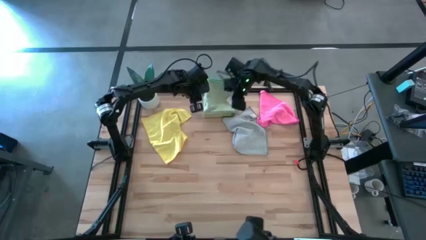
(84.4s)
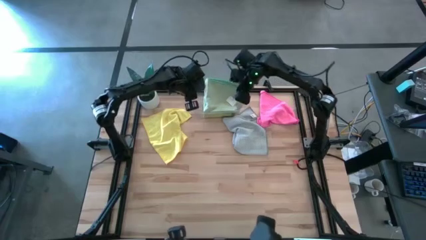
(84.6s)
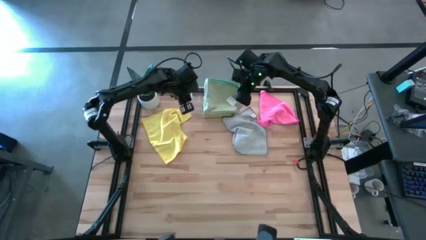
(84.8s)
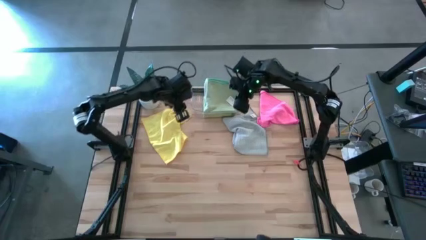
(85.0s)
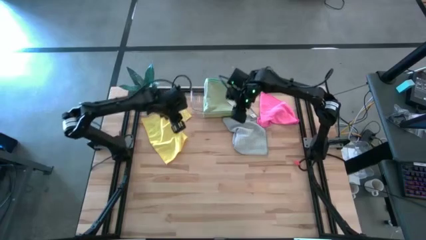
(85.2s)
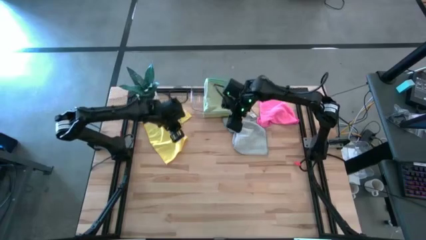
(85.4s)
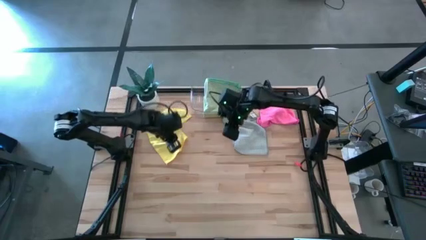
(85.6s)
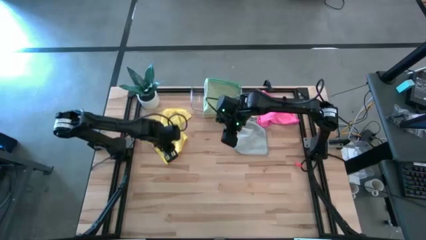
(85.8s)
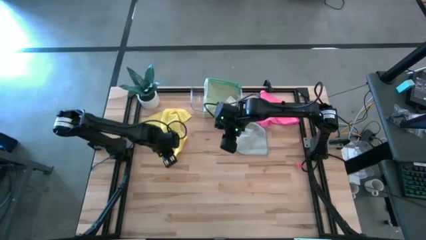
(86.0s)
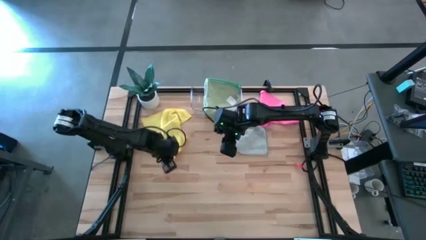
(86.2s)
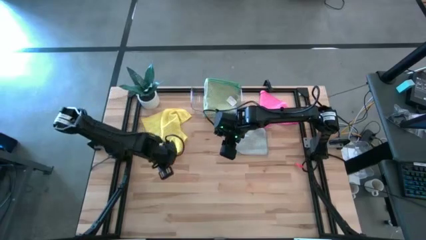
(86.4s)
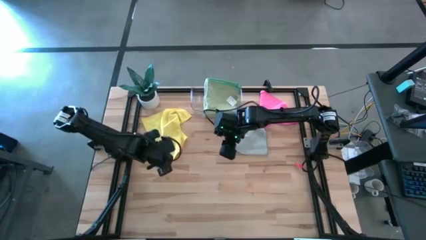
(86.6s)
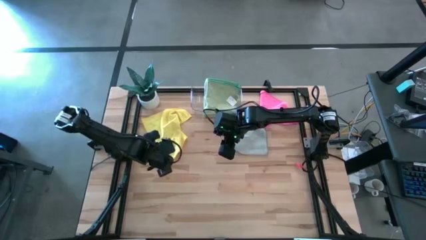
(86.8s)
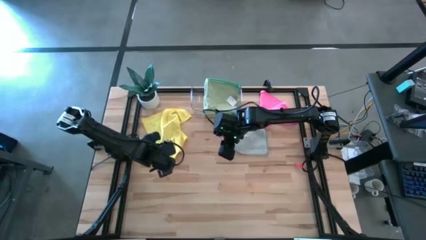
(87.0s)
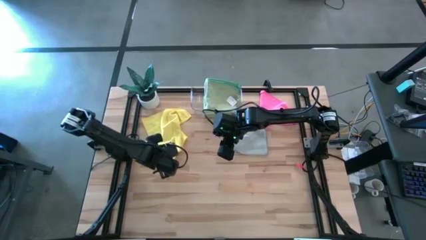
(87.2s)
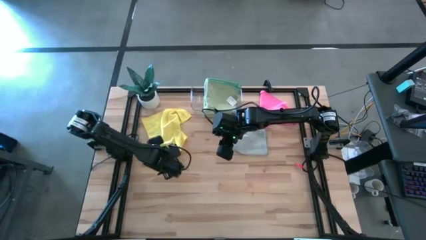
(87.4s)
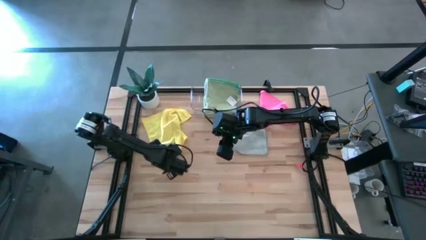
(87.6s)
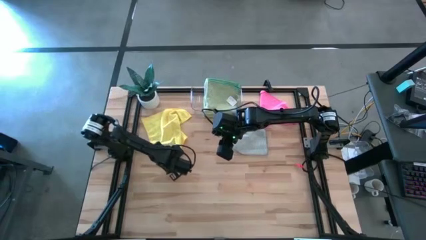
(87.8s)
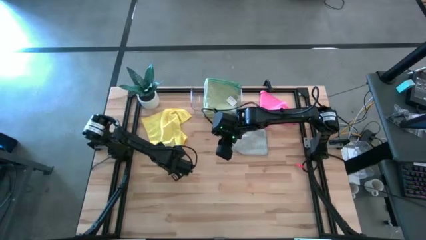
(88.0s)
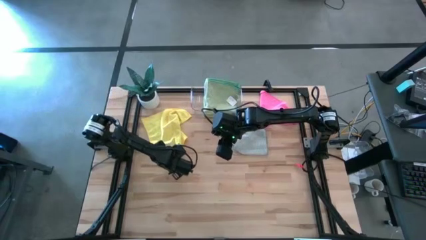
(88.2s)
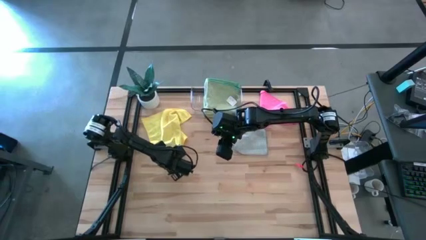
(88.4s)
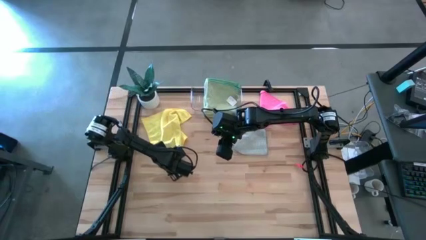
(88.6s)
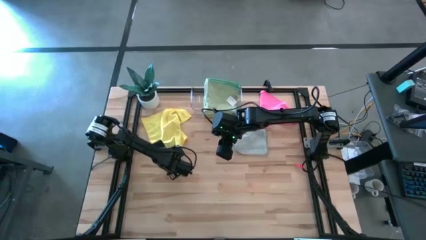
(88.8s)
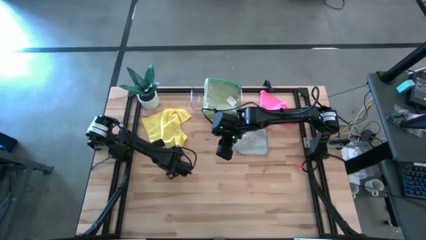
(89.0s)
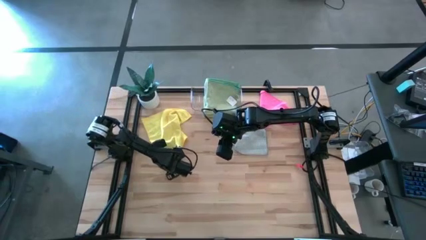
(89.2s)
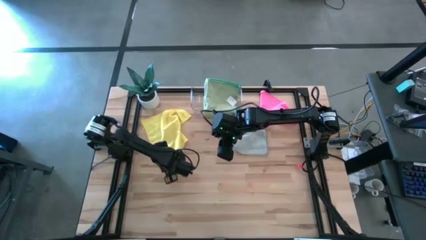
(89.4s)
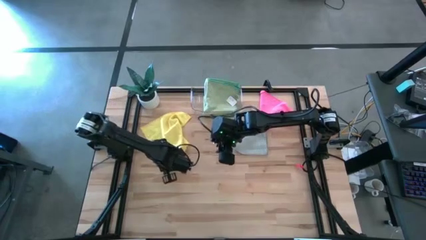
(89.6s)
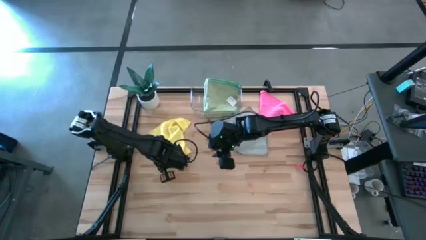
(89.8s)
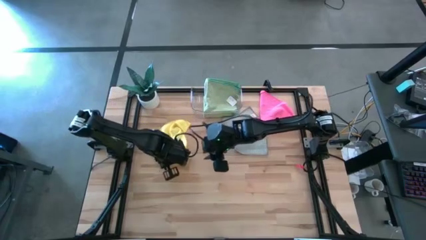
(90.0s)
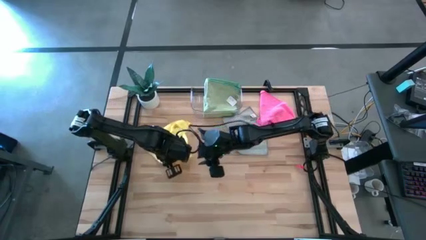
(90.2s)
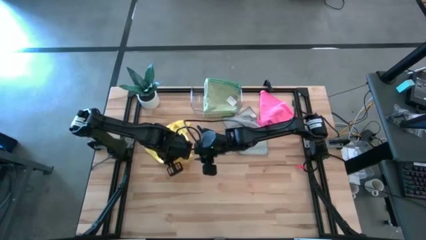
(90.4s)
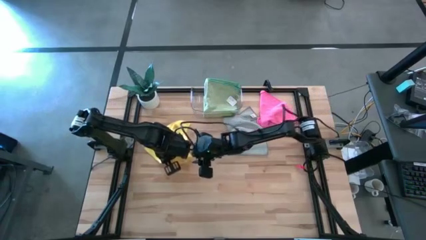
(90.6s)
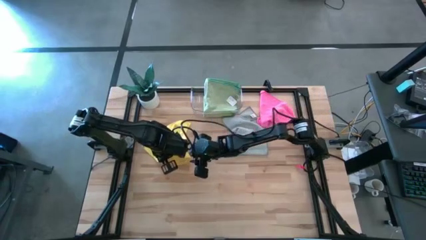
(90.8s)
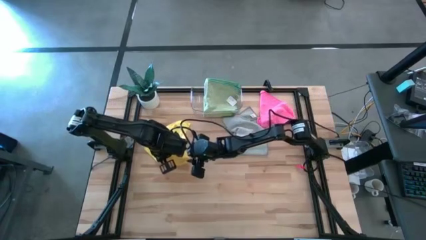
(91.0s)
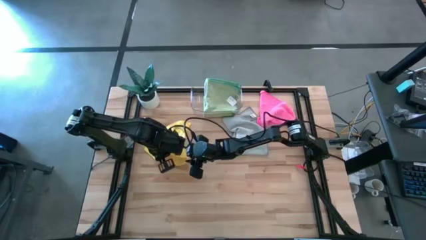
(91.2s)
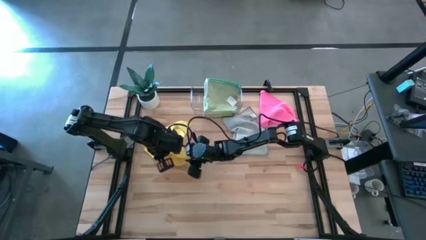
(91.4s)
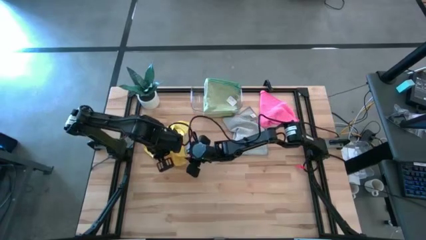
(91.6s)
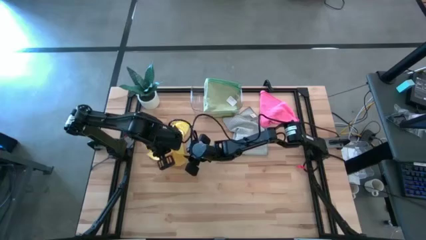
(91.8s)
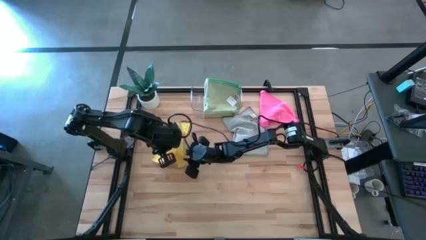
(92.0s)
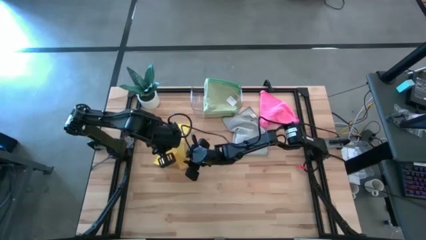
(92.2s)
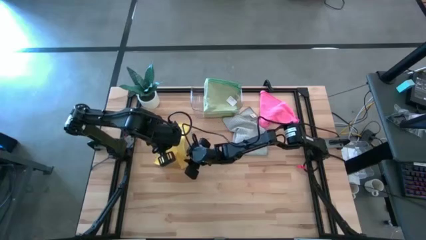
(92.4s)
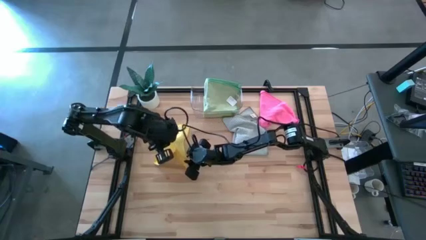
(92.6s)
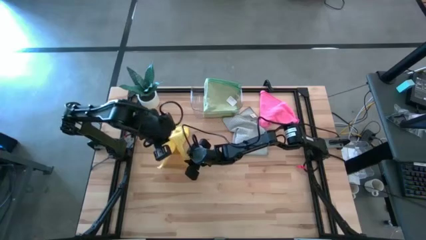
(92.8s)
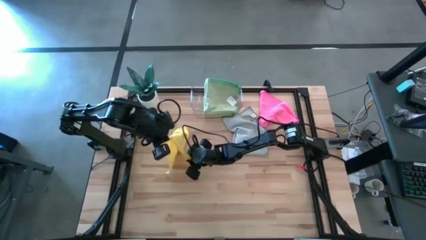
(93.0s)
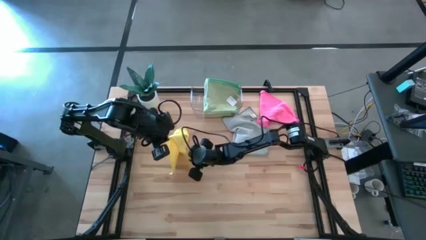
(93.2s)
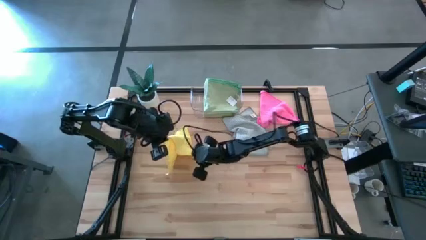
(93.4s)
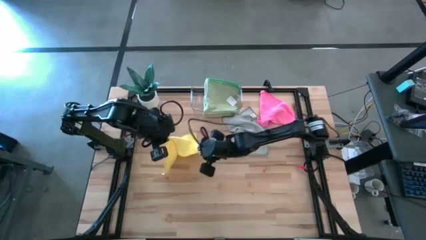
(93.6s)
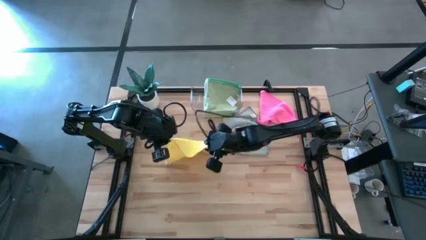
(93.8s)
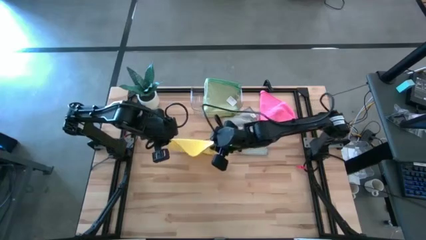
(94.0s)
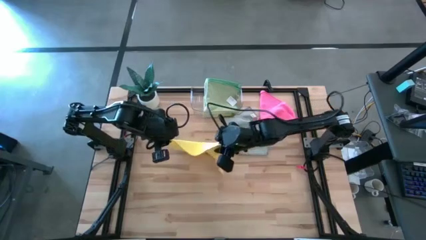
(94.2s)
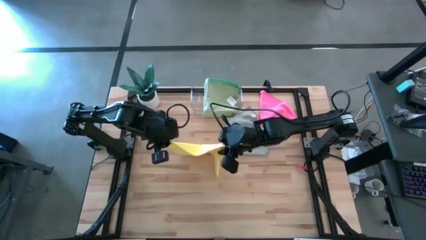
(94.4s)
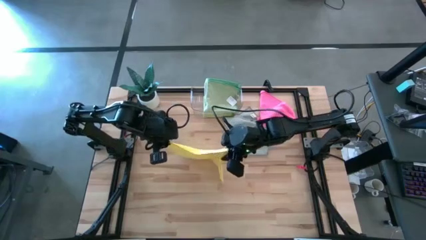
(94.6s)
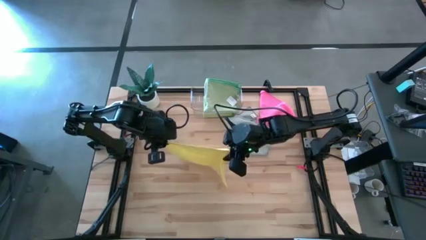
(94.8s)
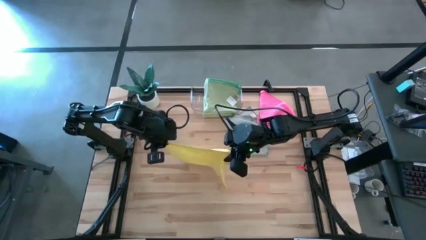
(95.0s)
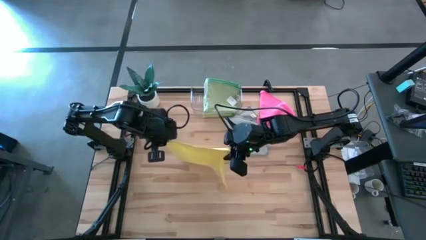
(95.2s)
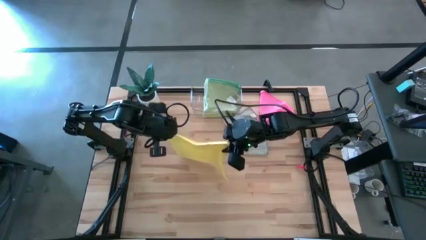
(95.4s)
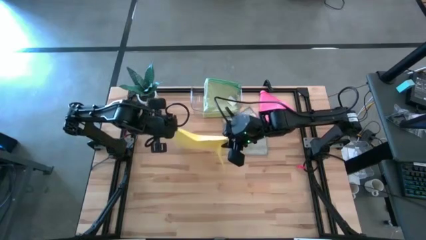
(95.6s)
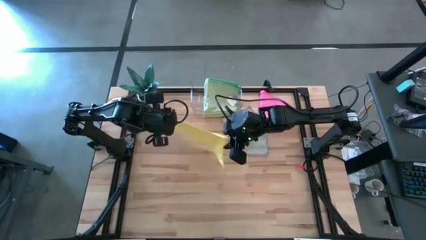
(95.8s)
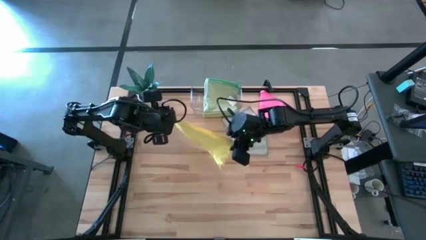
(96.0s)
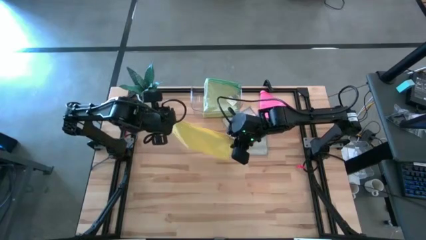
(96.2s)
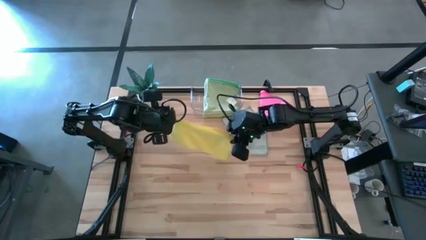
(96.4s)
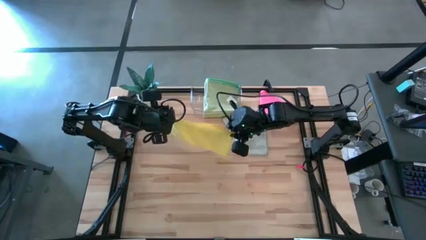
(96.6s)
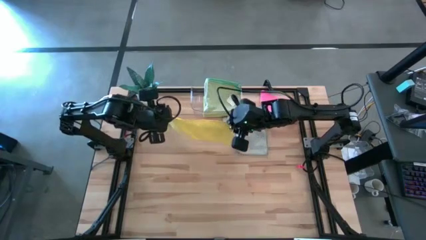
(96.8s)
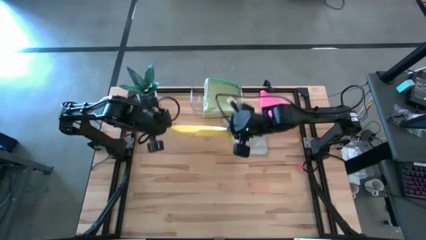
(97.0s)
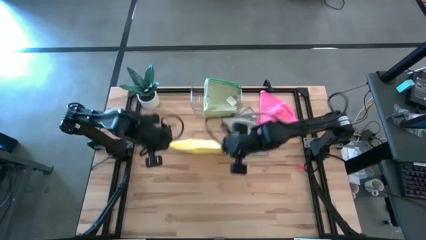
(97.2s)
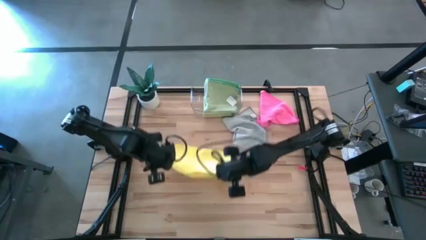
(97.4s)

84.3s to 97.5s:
Task: Fold microfiber towels
Fold the yellow microfiber cloth

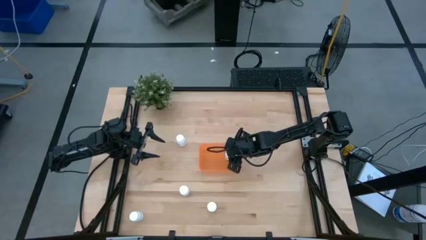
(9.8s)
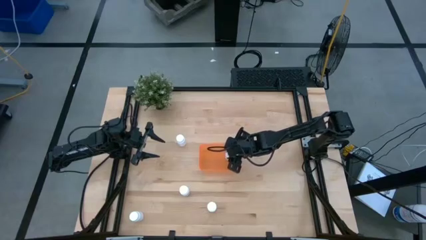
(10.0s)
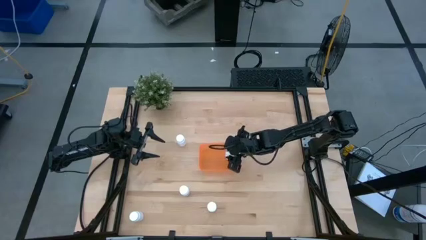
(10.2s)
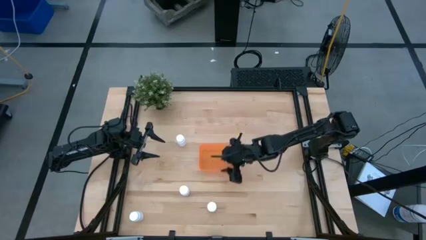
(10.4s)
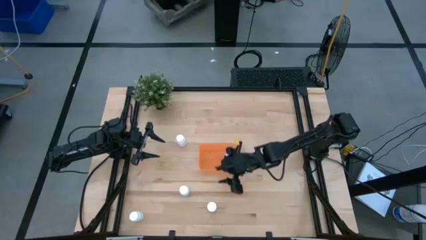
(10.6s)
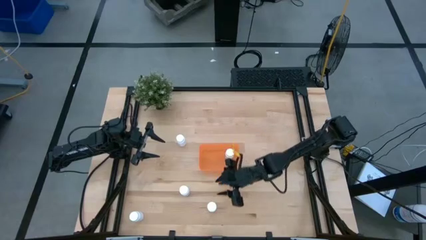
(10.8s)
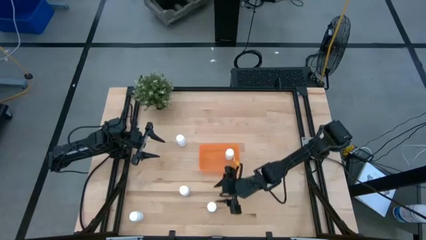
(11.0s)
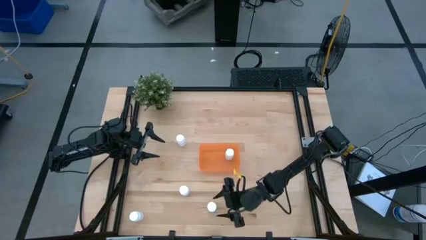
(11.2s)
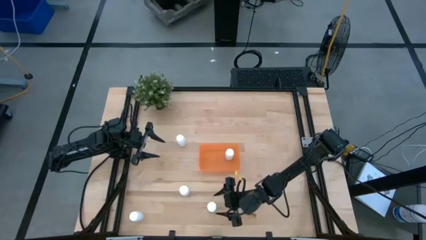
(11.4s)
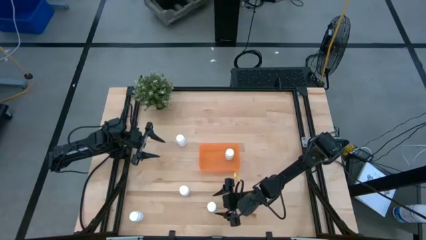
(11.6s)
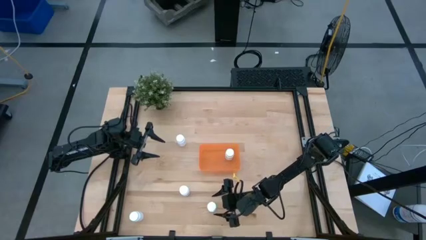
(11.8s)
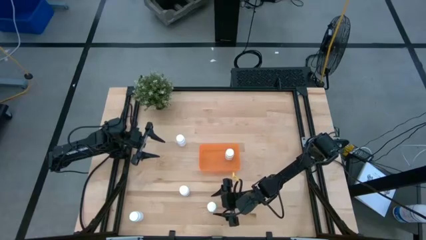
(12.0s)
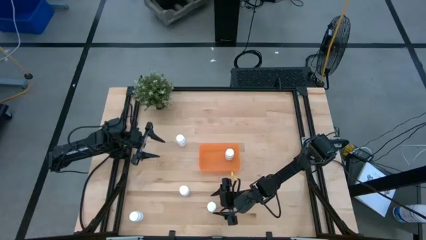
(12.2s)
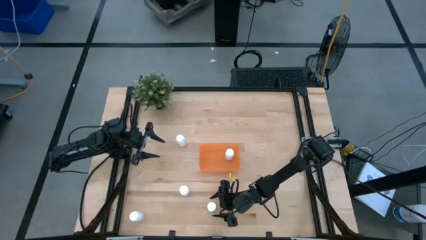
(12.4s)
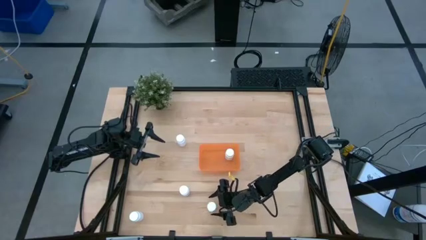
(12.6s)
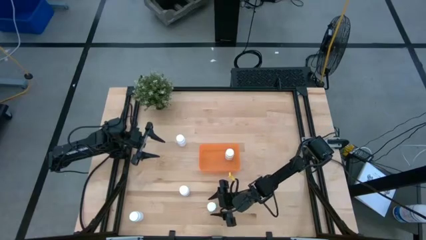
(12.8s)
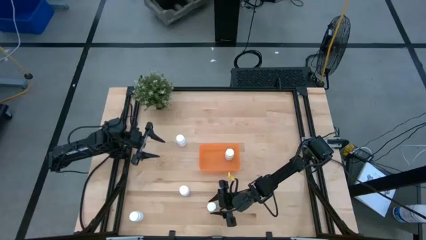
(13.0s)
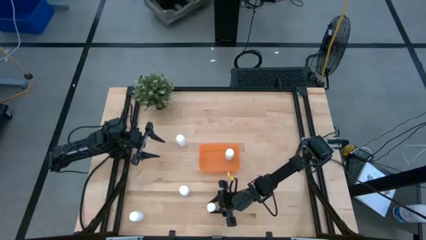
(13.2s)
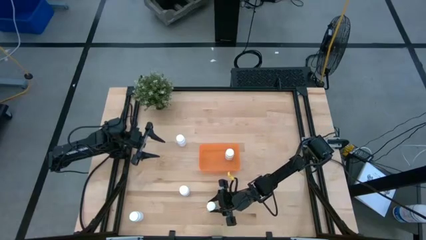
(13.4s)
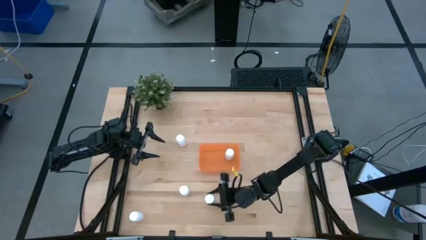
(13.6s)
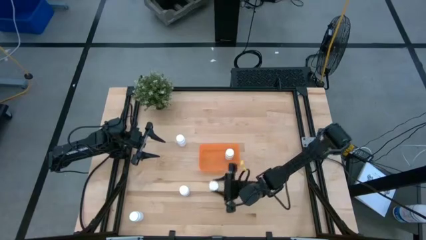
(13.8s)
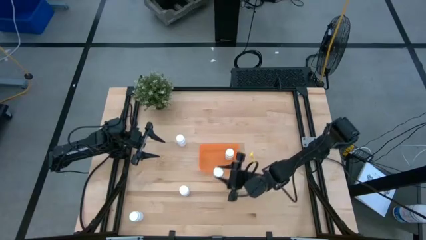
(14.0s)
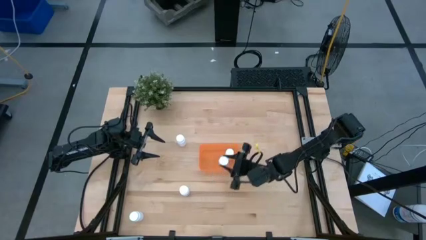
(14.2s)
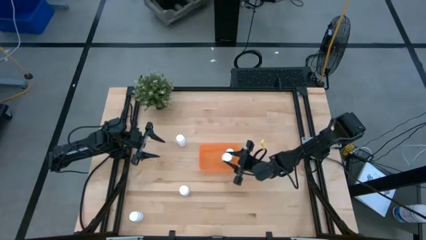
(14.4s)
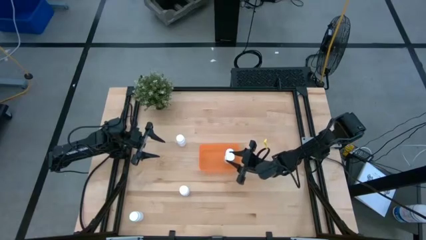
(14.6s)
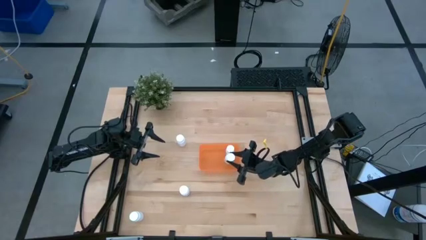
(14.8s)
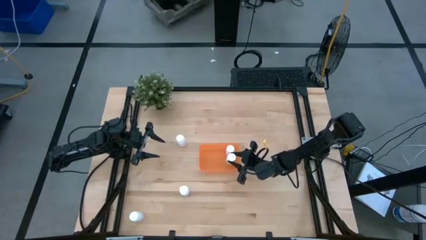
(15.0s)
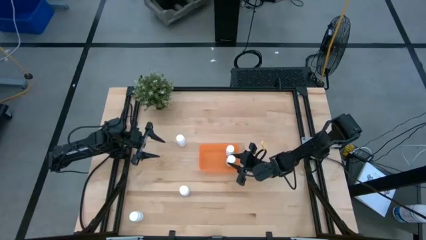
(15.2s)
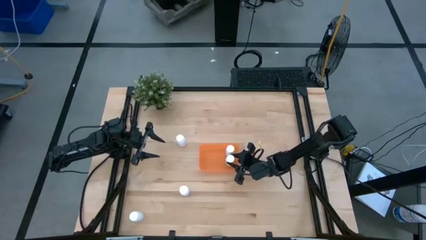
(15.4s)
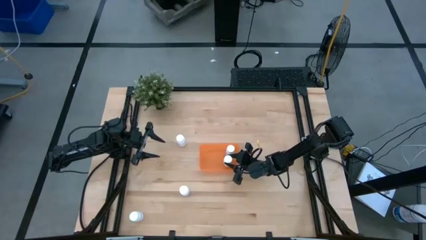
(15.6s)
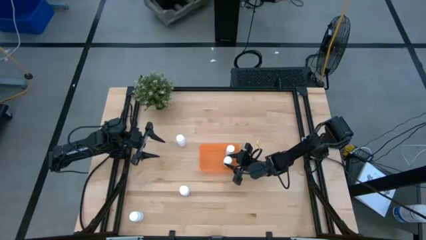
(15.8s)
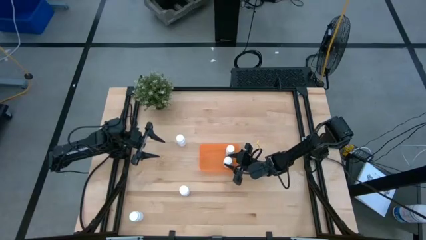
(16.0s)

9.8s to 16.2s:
Task: Pick and place pill bottles into a basket
Put the white medicine bottle into the orange bin
